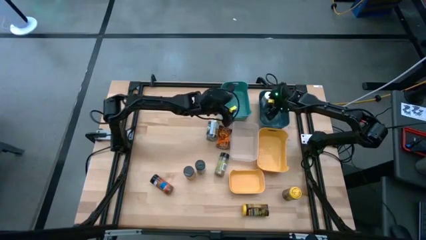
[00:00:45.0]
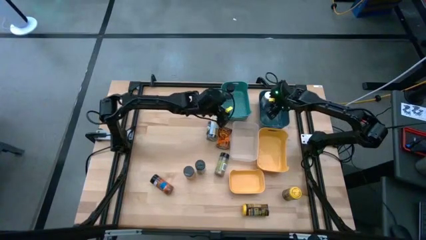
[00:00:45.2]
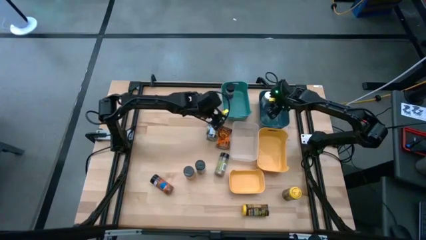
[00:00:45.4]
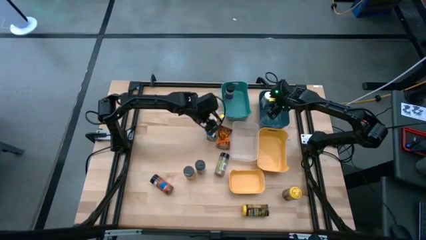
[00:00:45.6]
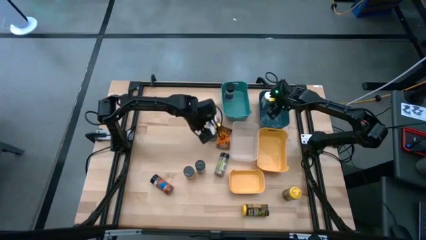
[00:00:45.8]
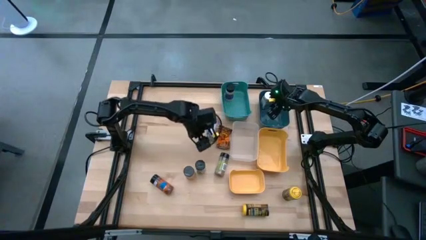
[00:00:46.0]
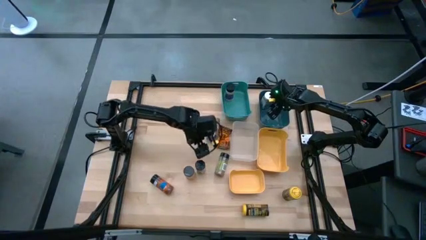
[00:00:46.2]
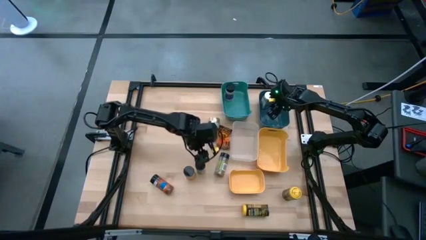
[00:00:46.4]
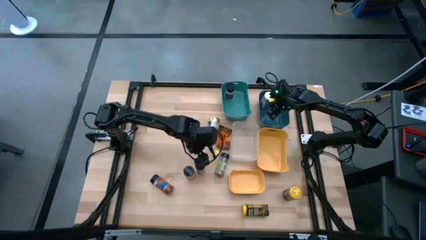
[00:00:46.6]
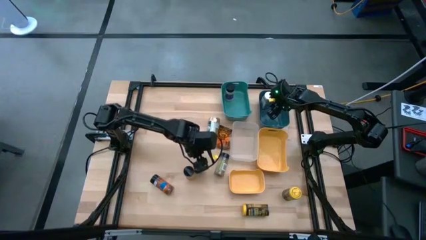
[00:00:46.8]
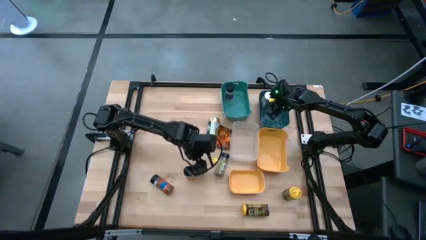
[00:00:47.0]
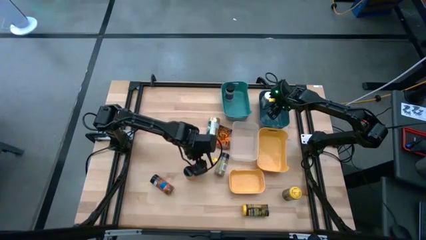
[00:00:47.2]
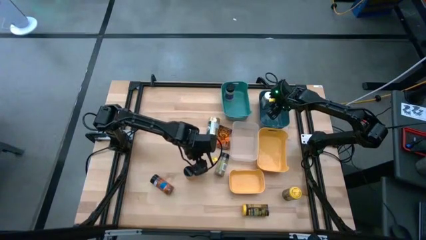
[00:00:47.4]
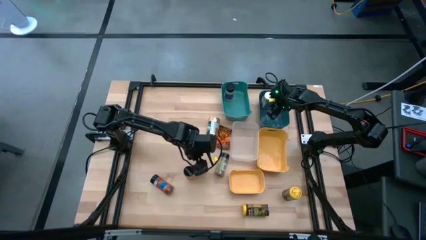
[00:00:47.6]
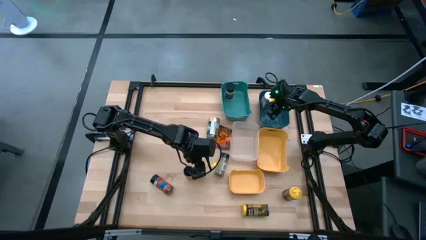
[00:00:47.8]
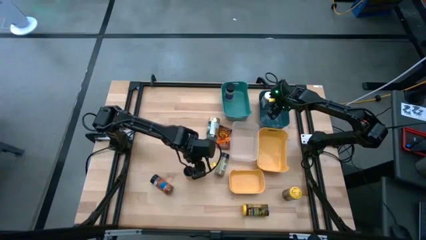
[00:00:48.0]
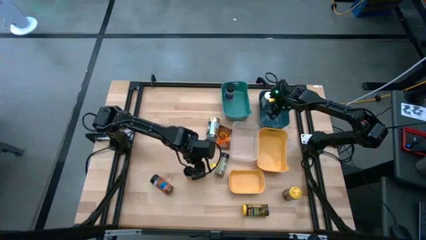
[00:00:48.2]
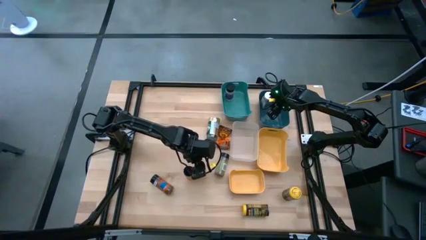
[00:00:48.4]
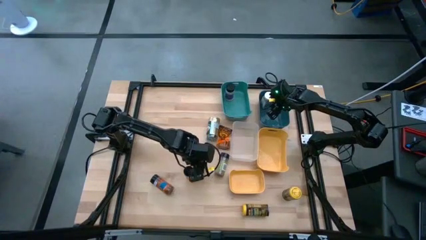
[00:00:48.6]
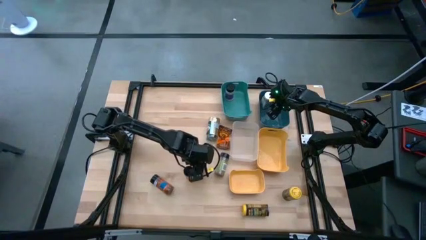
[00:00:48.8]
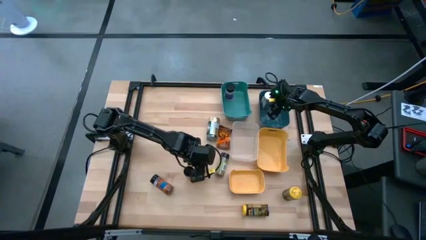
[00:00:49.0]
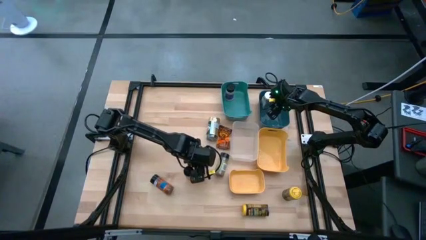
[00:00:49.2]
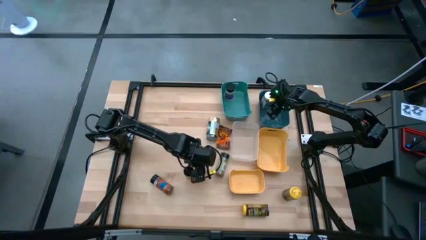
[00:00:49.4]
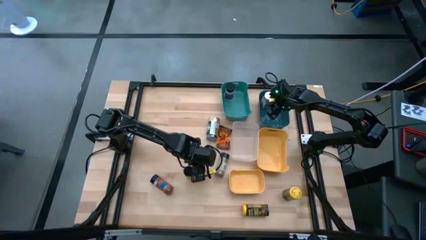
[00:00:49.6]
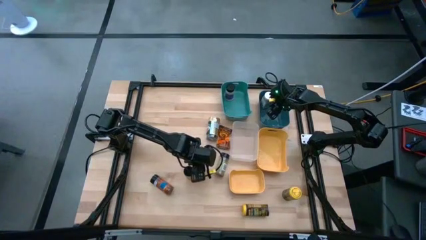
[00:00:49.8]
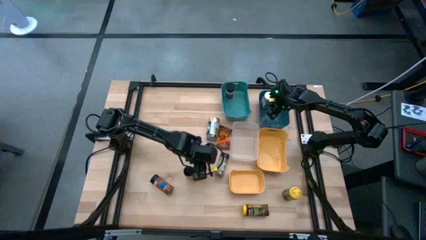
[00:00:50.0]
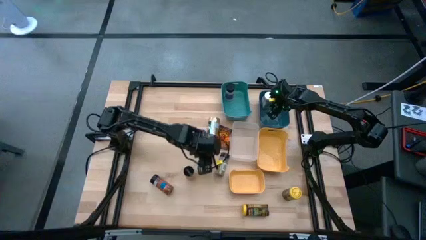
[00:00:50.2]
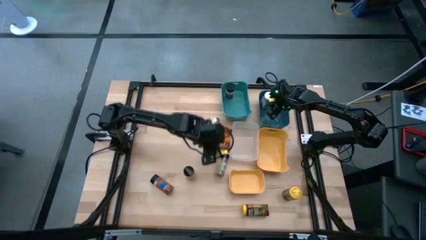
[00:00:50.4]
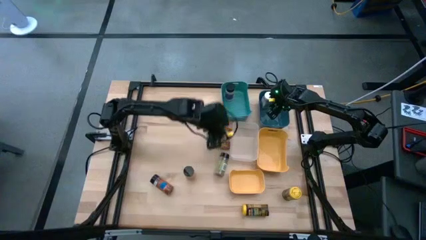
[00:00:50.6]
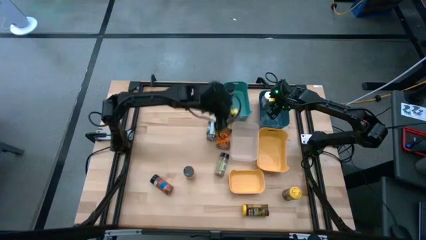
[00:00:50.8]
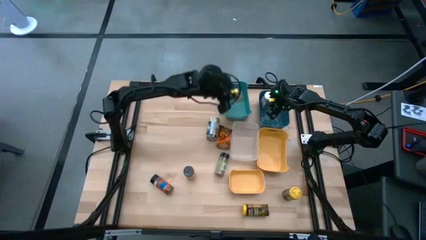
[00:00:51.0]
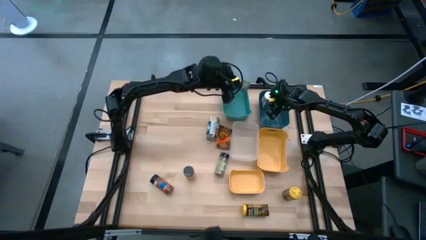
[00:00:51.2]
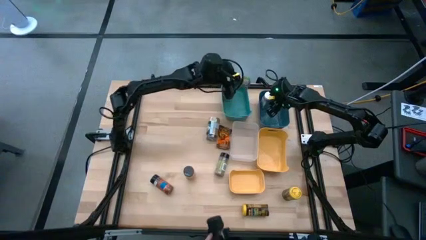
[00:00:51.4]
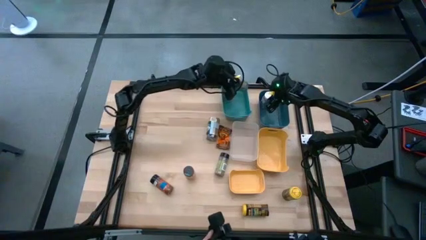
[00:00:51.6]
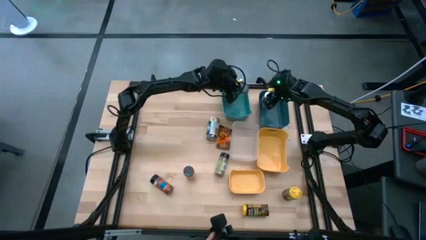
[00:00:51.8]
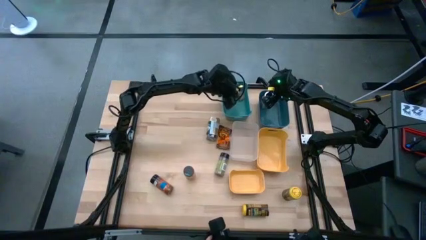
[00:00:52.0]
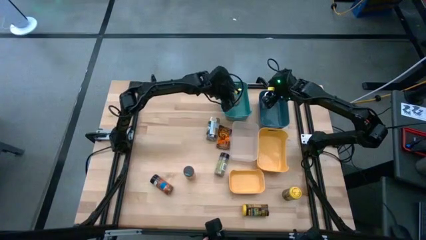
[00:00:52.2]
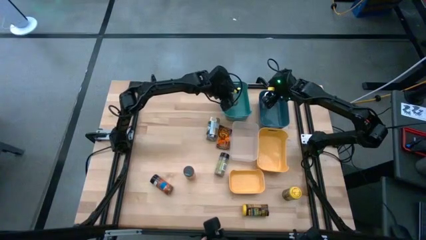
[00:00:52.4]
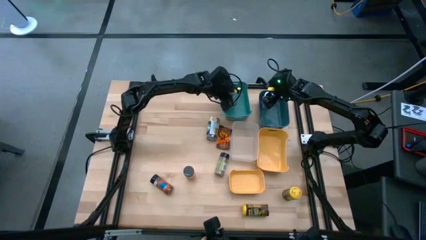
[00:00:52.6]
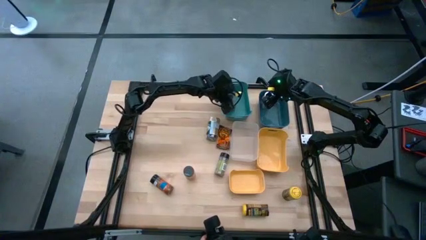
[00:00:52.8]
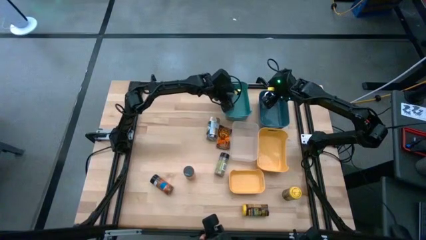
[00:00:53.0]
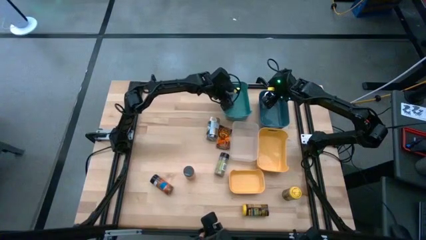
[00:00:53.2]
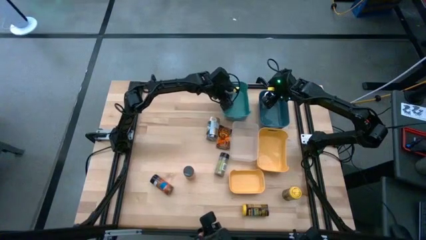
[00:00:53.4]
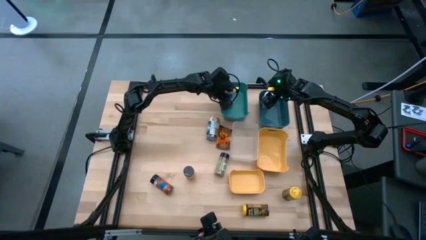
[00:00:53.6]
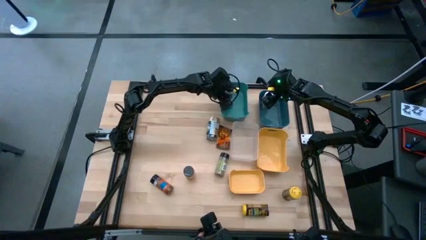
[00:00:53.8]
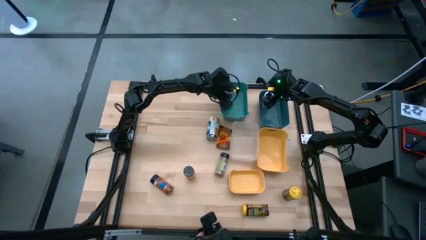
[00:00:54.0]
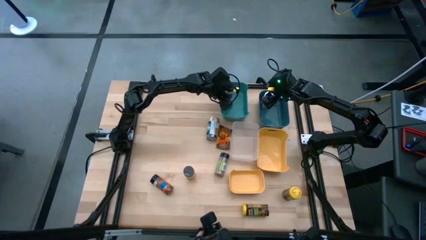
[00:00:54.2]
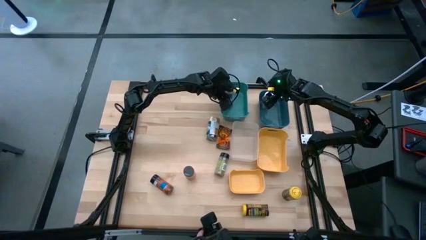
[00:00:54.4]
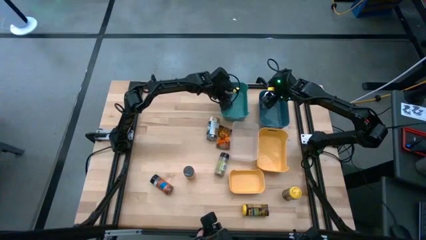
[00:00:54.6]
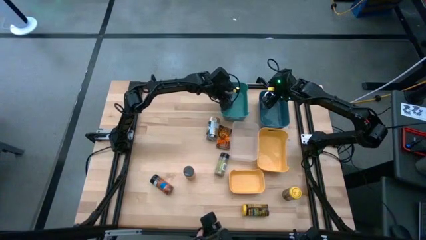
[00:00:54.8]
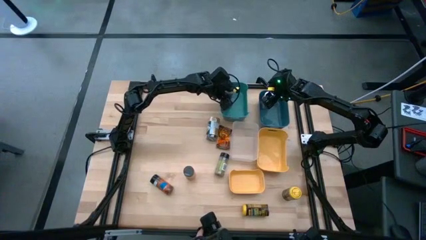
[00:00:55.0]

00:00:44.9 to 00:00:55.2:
Task: Sort spices by type
Put the green seasoning into the green bin

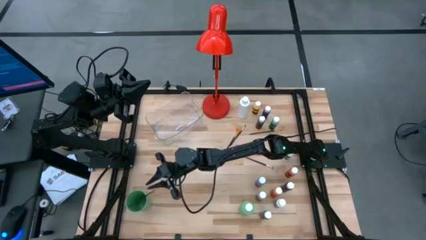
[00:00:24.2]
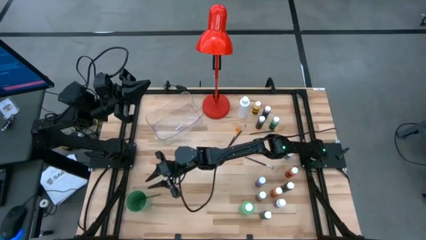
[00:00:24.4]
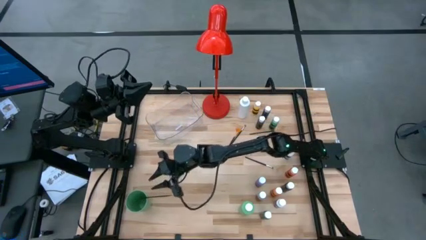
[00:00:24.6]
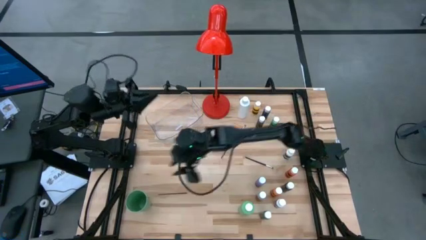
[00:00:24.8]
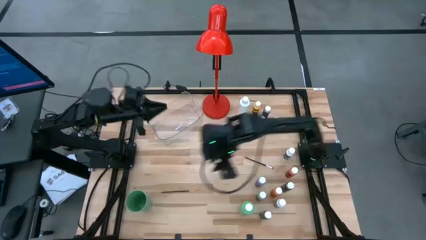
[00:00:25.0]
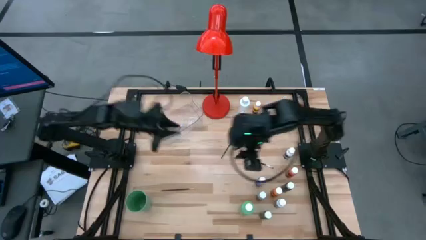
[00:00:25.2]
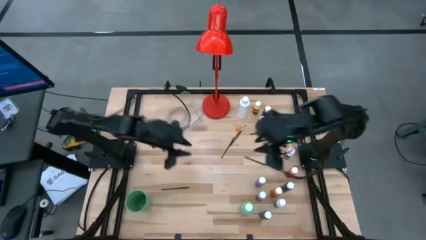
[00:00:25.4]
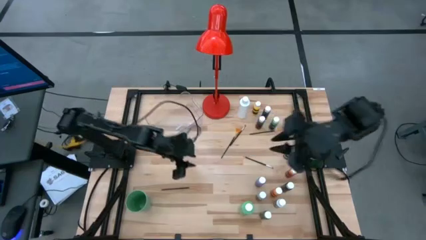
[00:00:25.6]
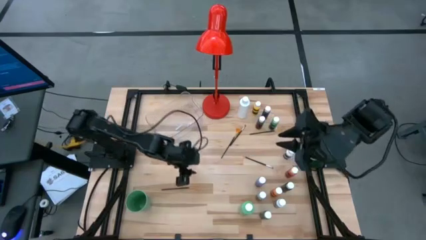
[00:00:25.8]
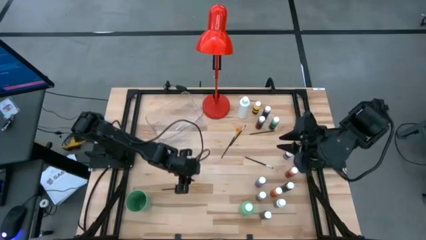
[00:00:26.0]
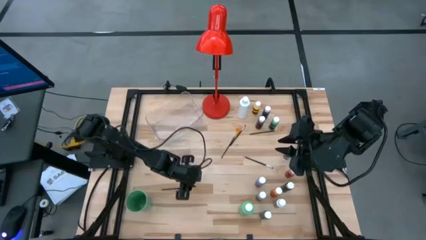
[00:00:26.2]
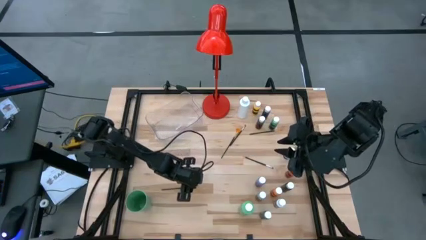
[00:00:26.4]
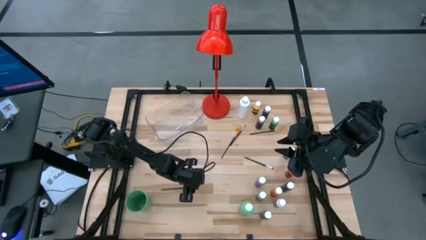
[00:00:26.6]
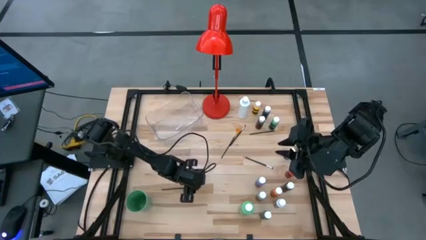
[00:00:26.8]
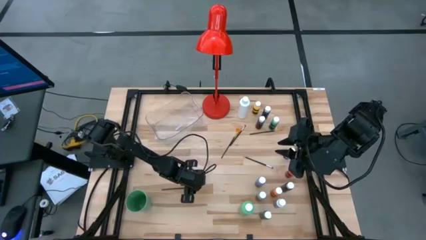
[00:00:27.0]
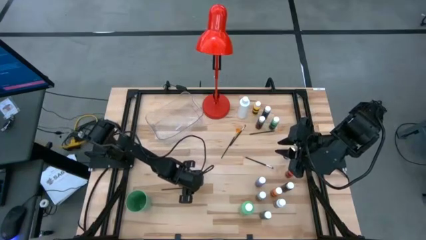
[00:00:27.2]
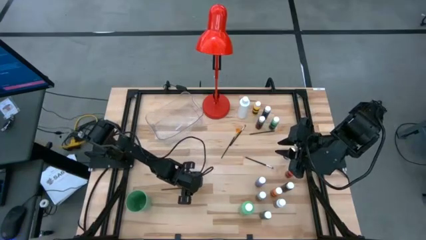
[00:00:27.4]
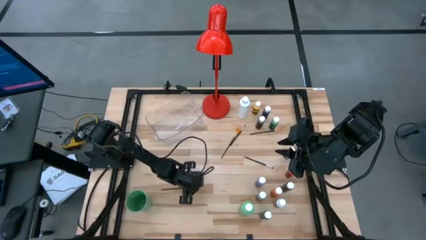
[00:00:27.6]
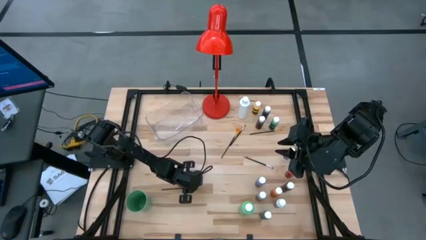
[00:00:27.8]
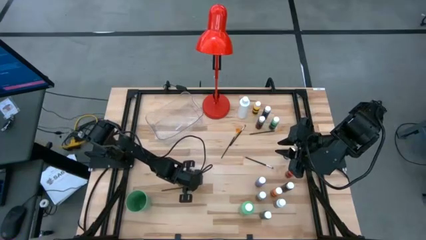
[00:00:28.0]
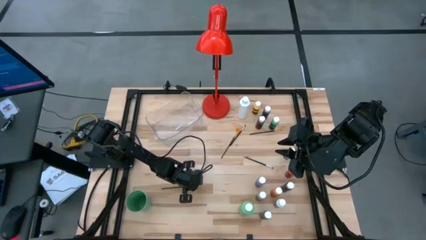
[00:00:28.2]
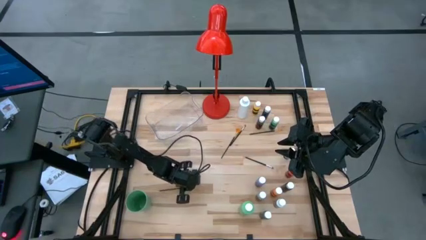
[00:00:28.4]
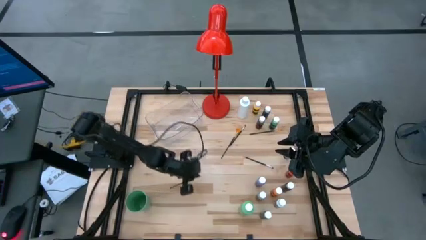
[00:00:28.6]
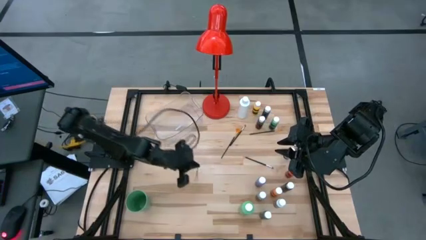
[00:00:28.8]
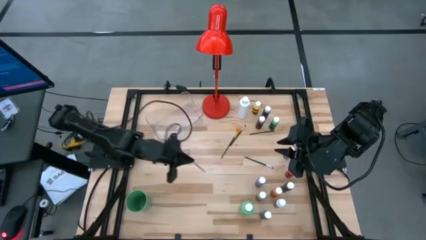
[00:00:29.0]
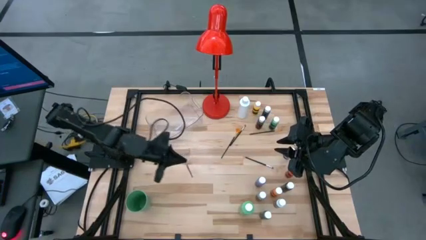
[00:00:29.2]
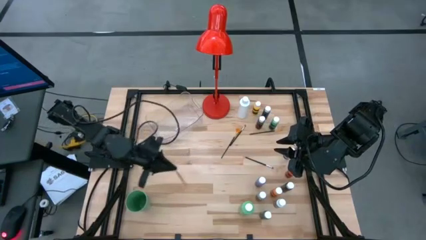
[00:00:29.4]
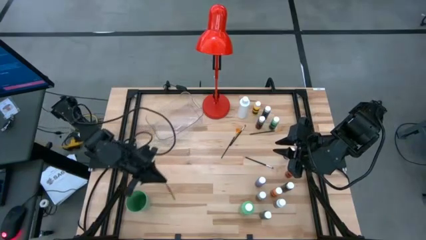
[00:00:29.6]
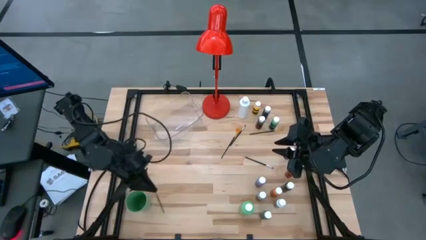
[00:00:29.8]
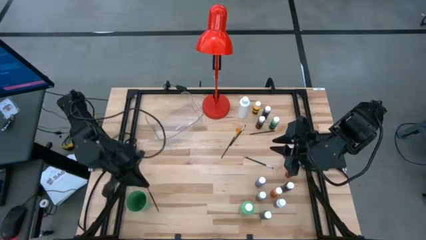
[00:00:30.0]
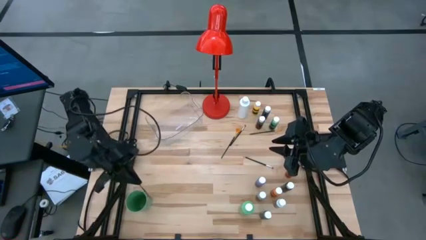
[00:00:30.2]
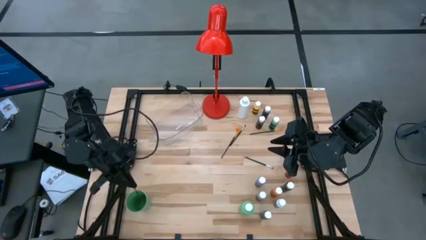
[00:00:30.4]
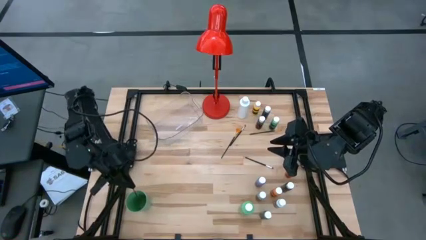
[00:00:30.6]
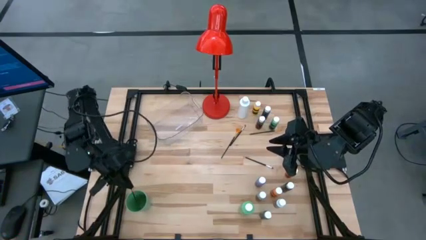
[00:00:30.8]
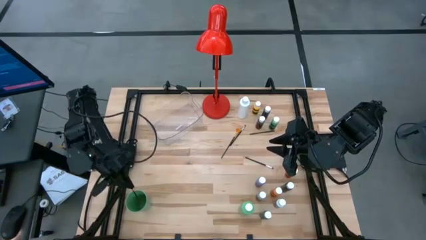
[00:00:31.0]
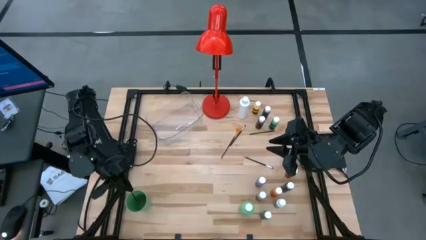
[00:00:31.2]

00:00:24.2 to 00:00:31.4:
Task: Pick & Place Paint Supplies
Put the black paintbrush into the green cup
